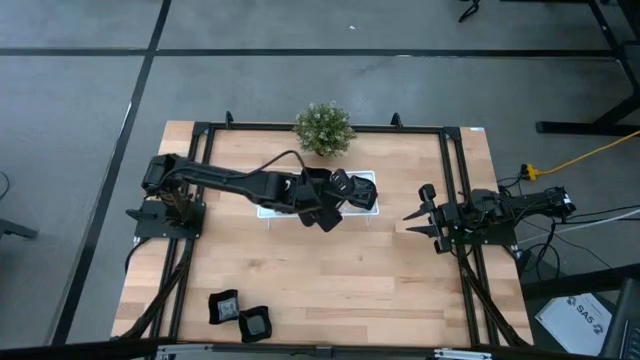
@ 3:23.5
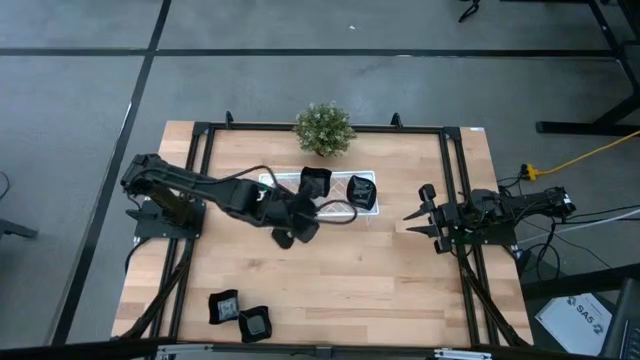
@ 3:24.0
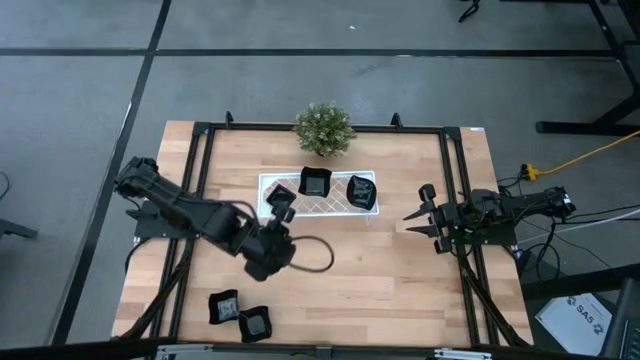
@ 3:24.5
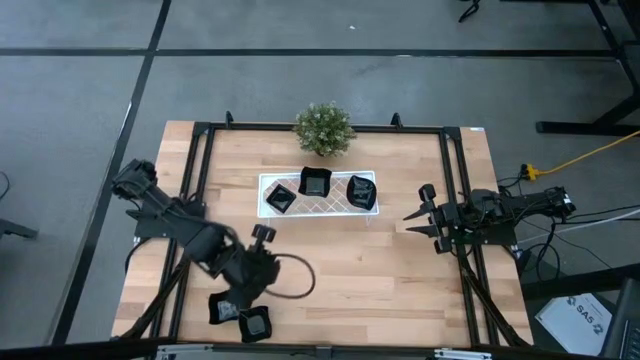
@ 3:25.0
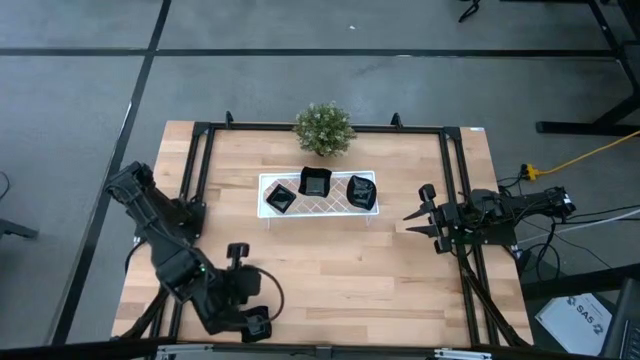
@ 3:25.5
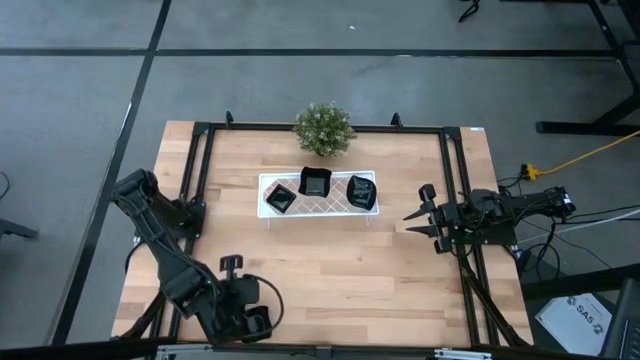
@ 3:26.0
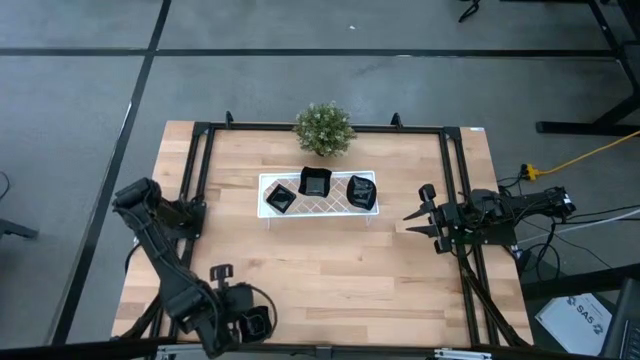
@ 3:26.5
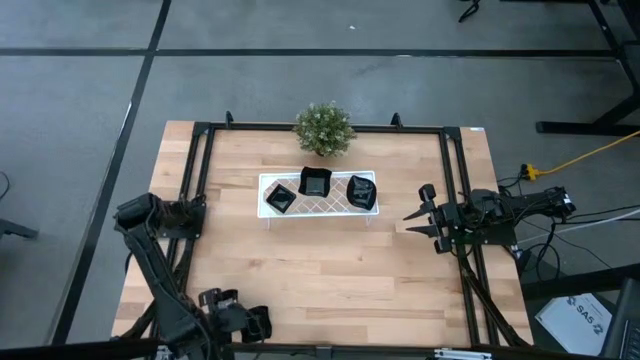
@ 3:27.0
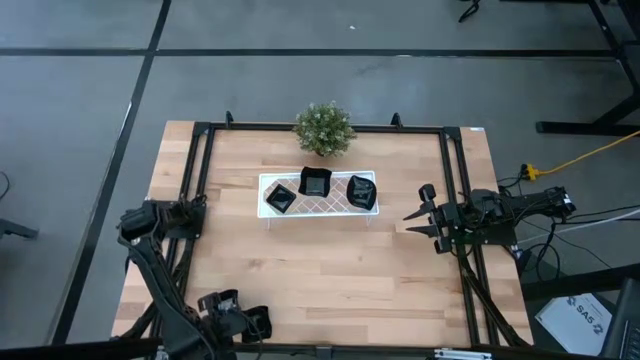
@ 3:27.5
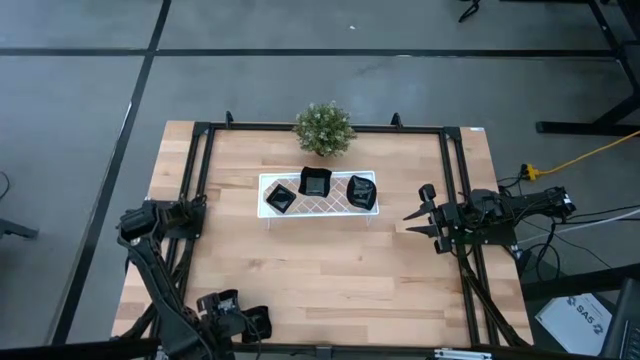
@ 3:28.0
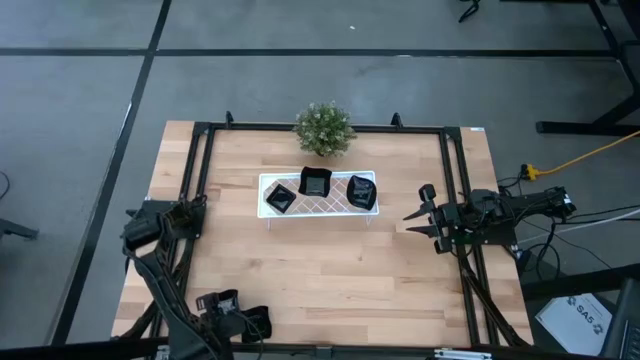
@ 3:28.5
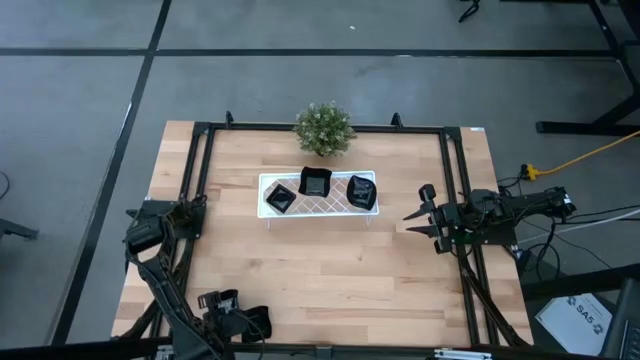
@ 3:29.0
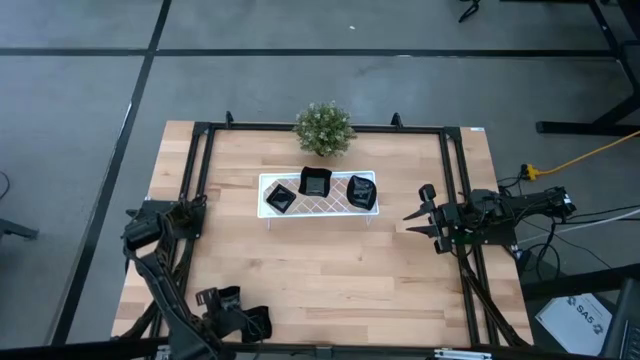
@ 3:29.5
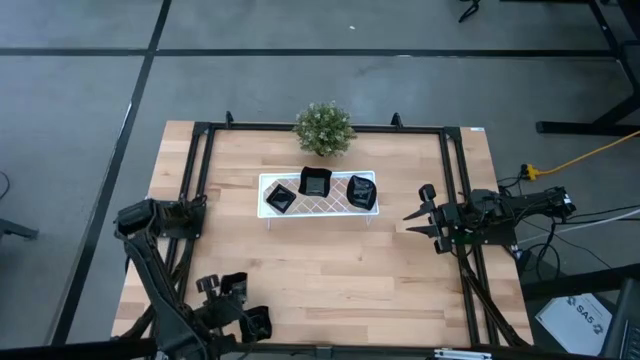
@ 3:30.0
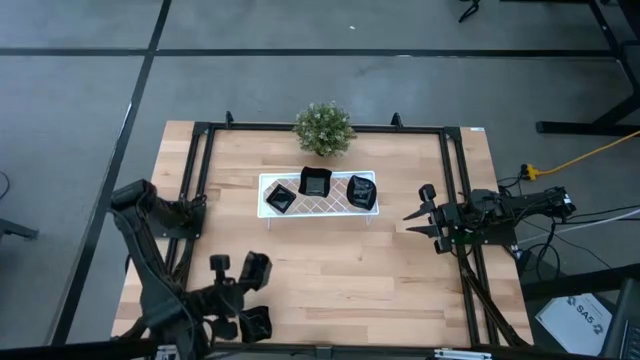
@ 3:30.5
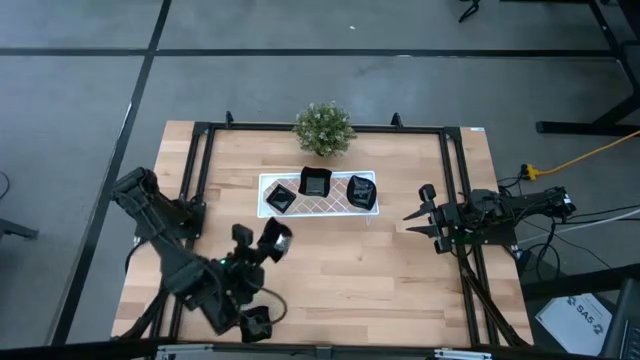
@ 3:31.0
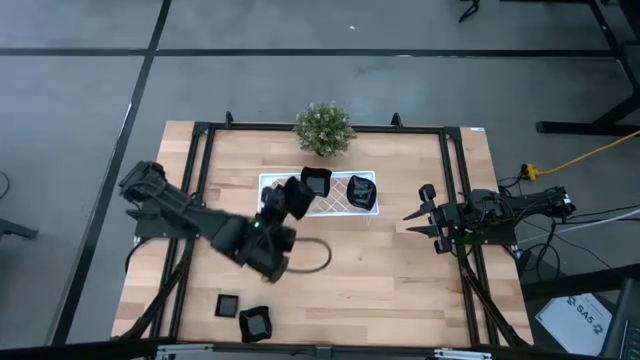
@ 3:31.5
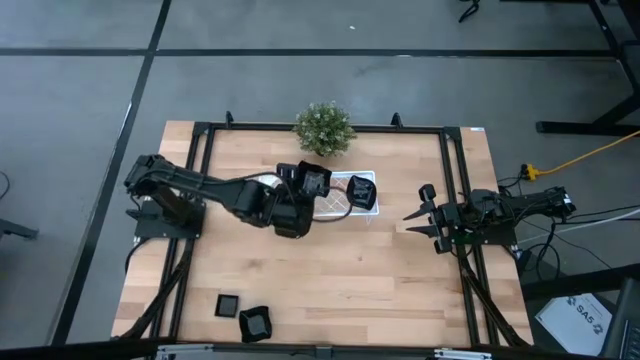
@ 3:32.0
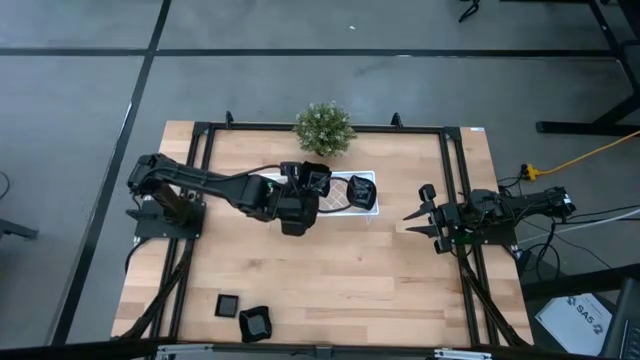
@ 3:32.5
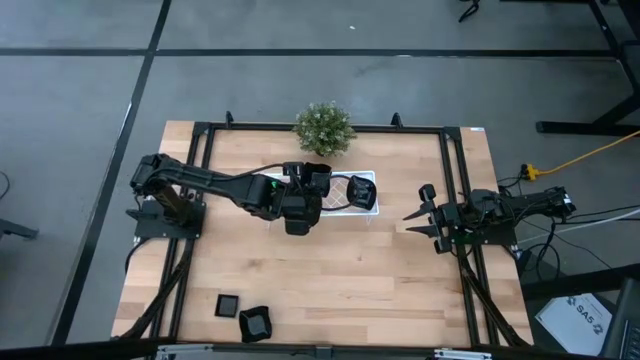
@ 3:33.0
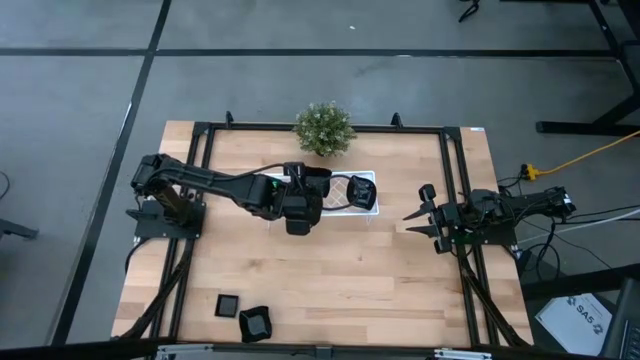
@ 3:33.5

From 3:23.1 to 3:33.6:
Task: Pick & Place Mini shaped plates
Stack the black distorted square plate on top of the black distorted square plate on the shelf

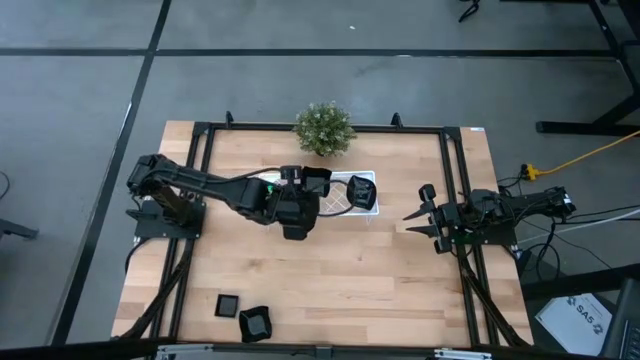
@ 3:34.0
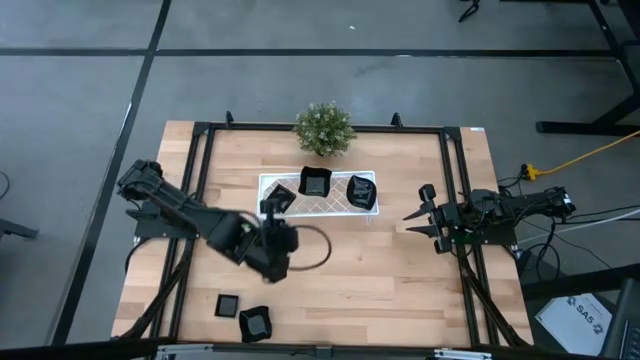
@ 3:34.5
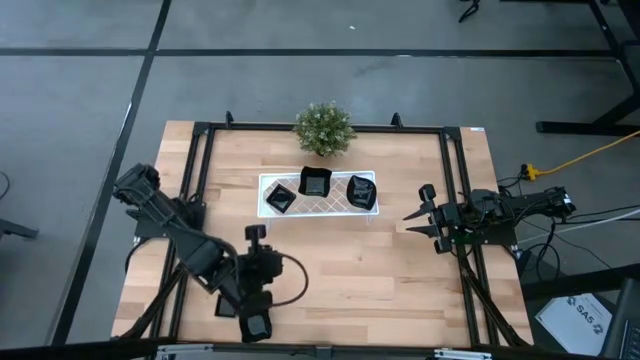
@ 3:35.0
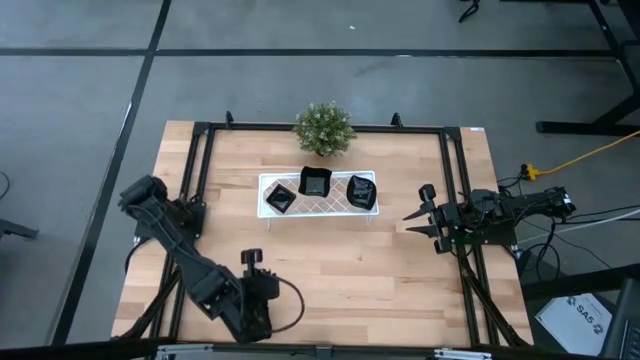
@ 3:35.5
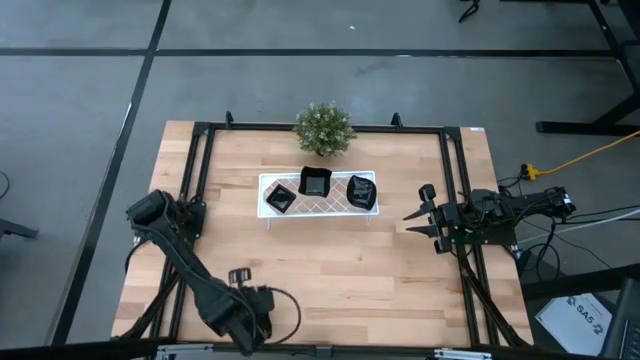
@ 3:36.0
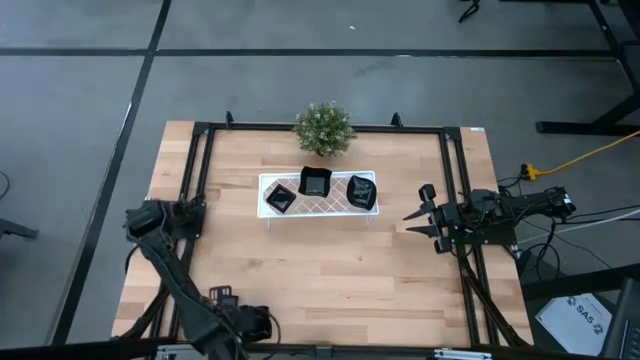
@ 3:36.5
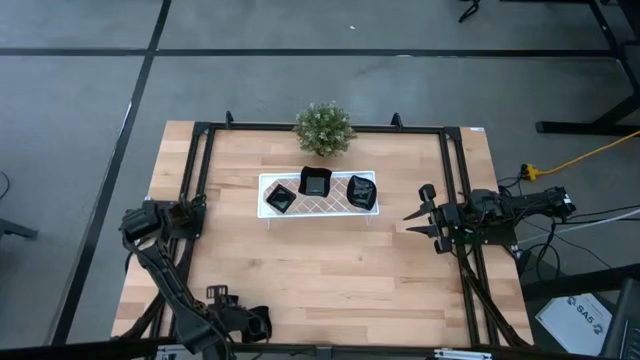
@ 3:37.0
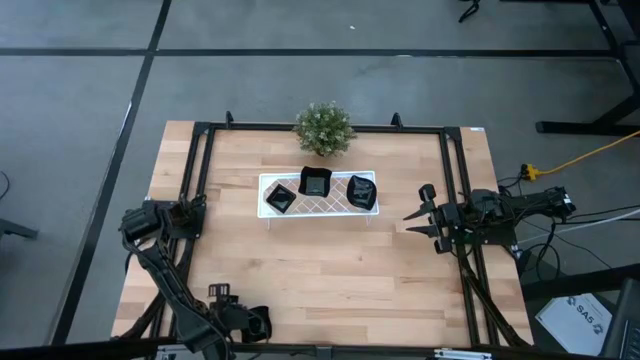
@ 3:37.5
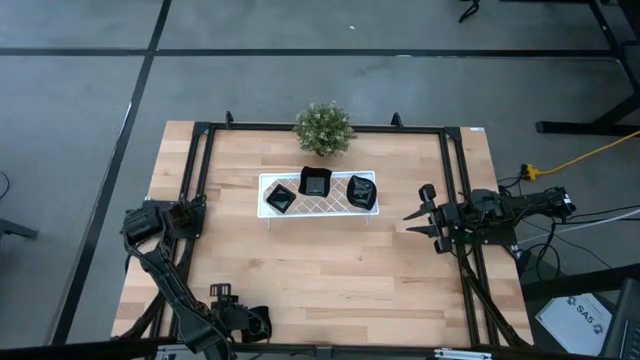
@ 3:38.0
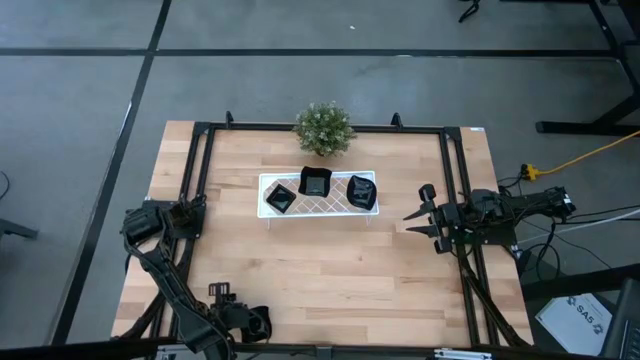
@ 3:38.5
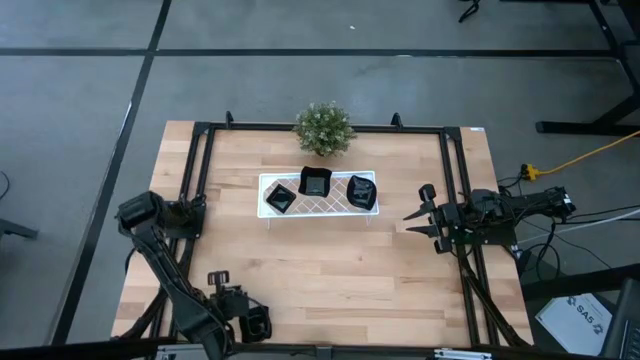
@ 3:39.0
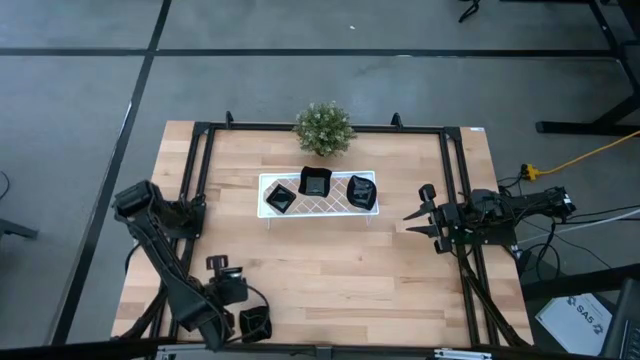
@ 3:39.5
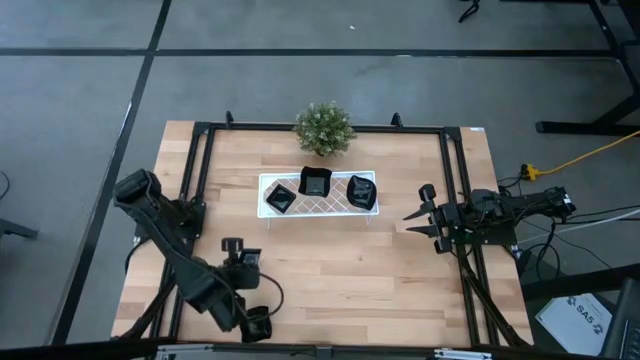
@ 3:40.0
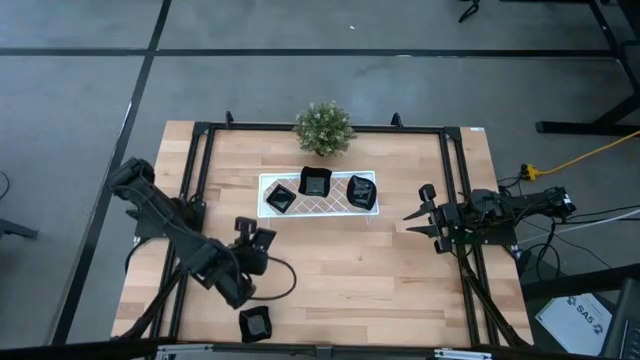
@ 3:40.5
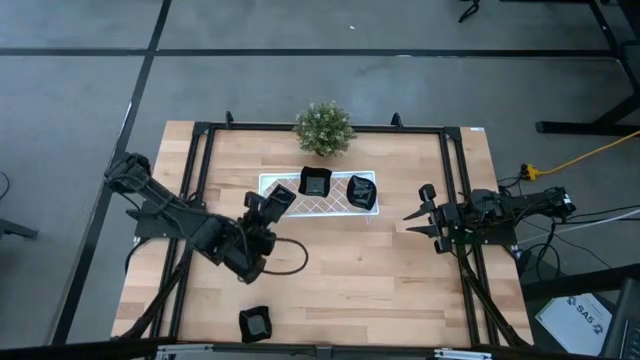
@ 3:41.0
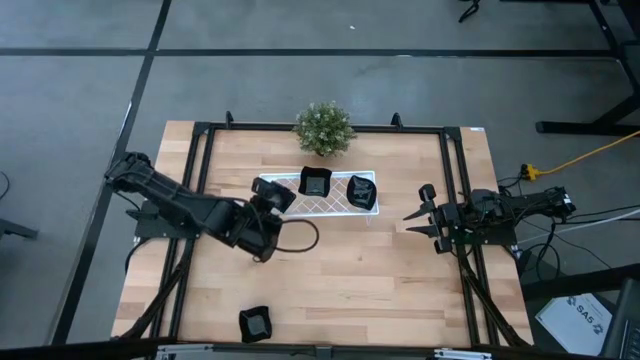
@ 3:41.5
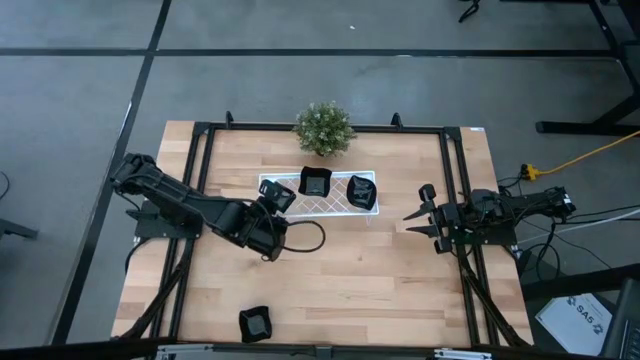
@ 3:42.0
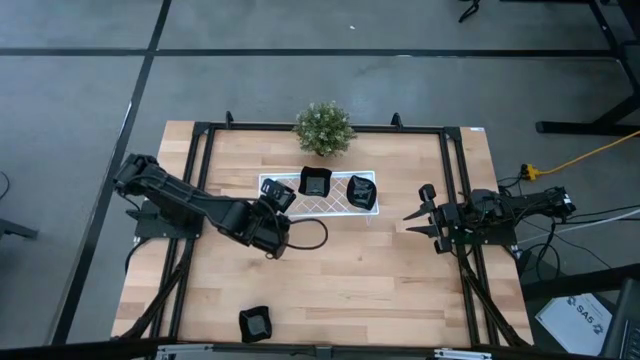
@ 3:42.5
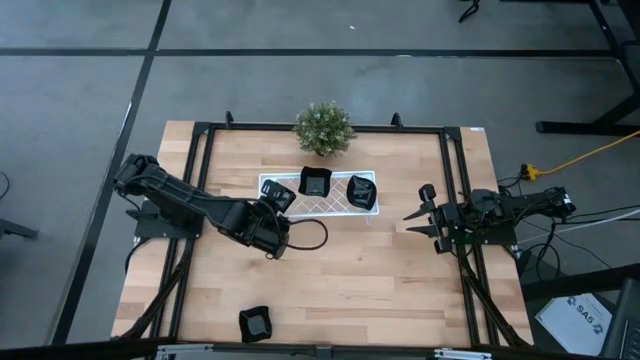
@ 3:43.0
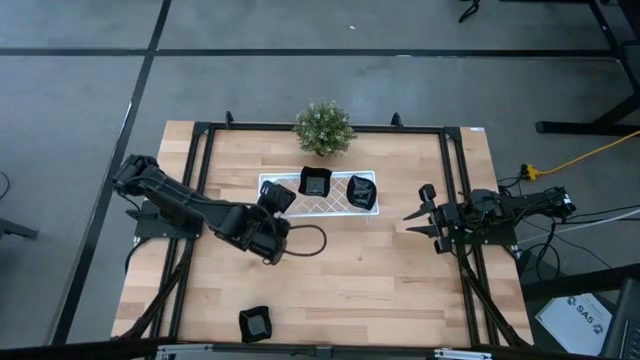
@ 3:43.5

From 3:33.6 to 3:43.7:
Stack the black square plate on top of the black square plate on the shelf
